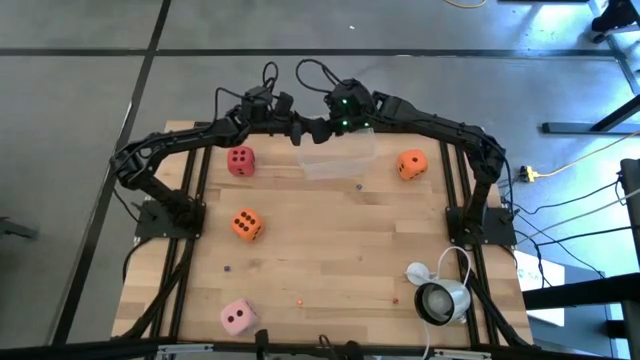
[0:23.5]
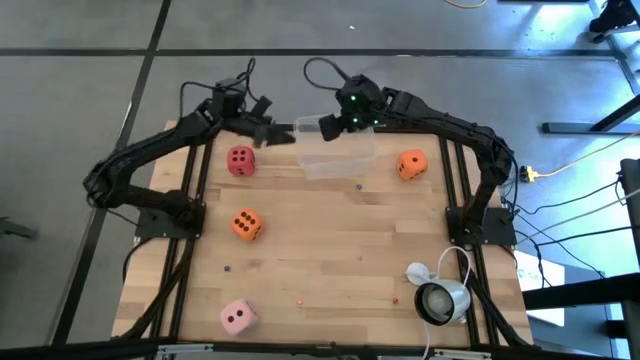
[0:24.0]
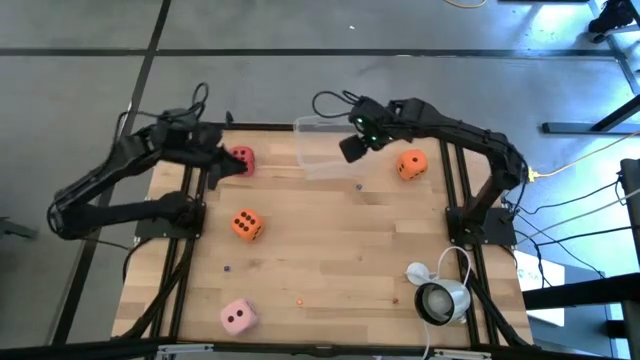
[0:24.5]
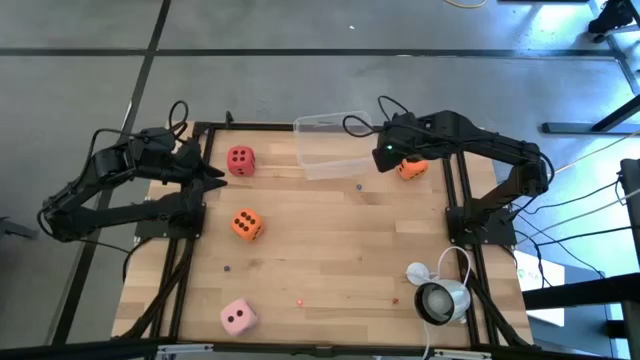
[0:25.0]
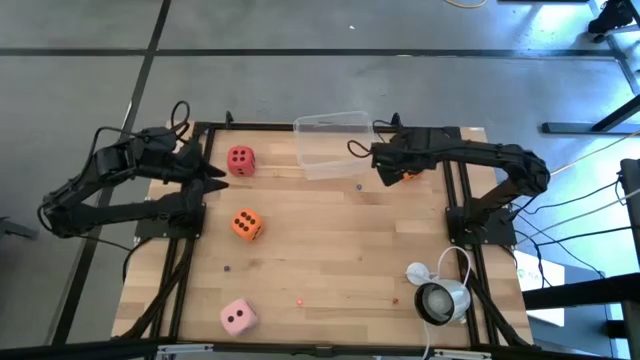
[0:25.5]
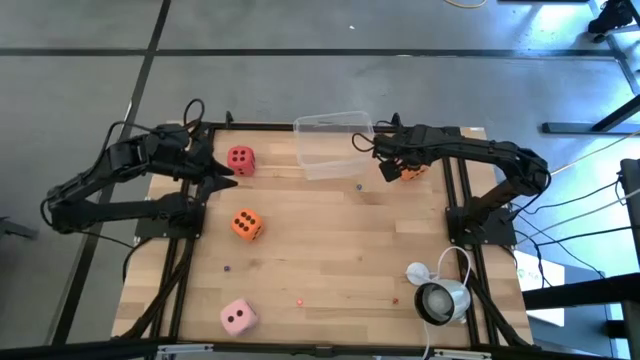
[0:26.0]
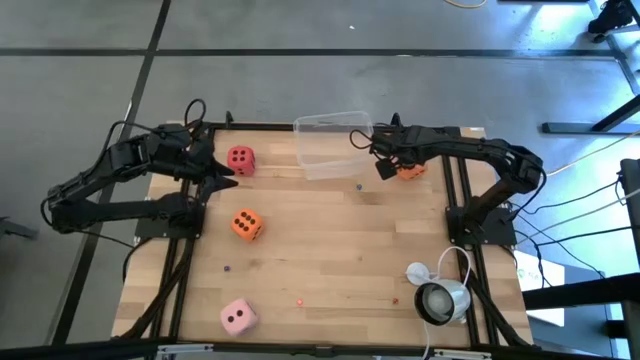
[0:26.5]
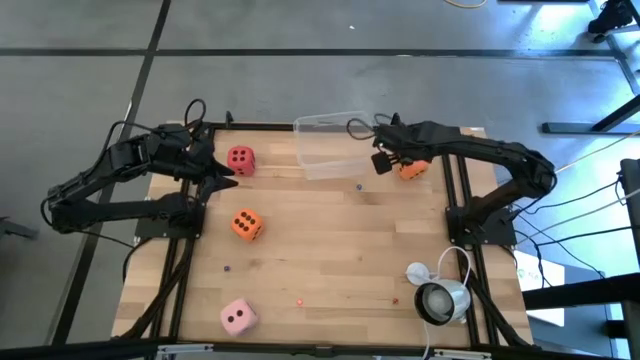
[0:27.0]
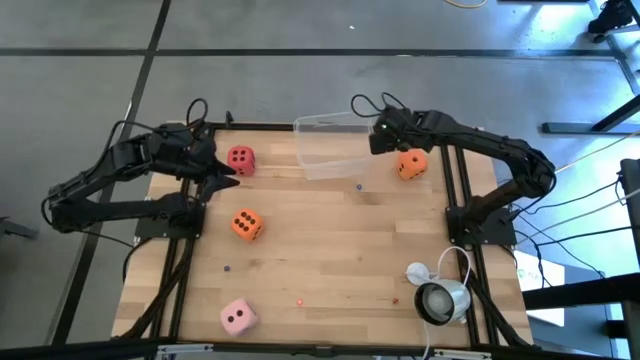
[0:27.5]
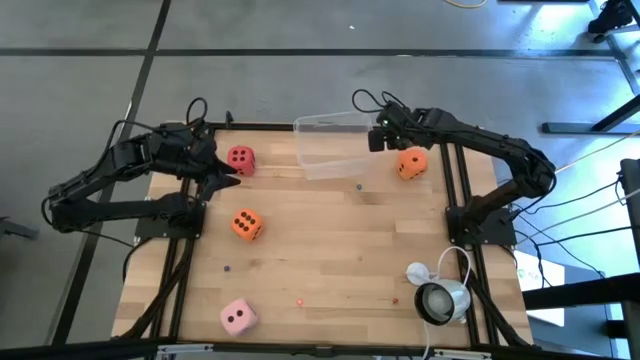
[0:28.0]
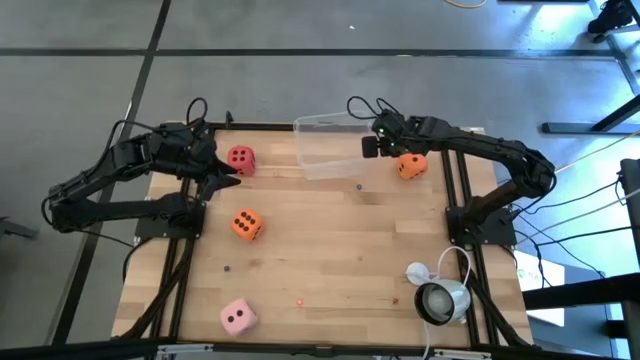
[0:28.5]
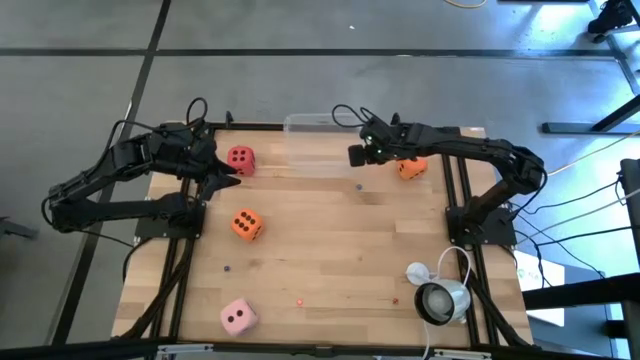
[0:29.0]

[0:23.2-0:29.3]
Task: Pick & Place Dice
Adjust the transparent bin

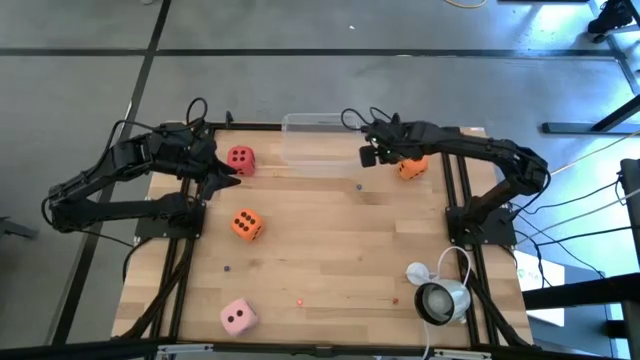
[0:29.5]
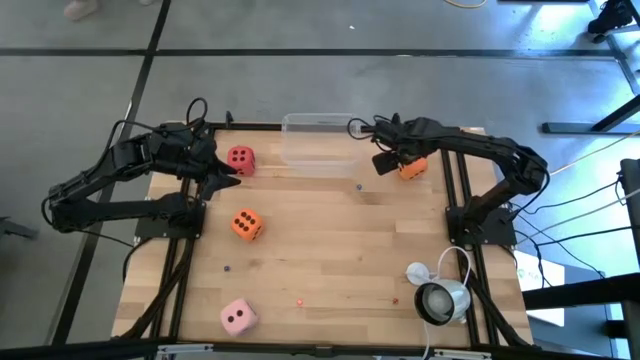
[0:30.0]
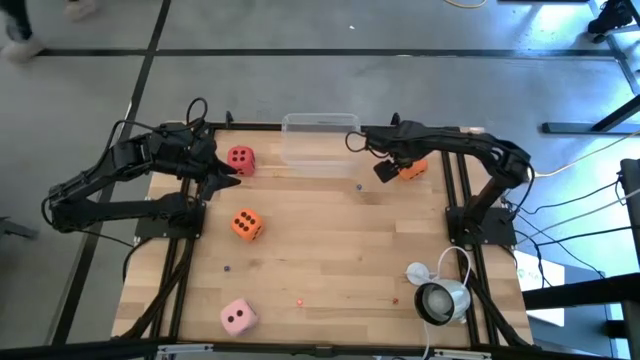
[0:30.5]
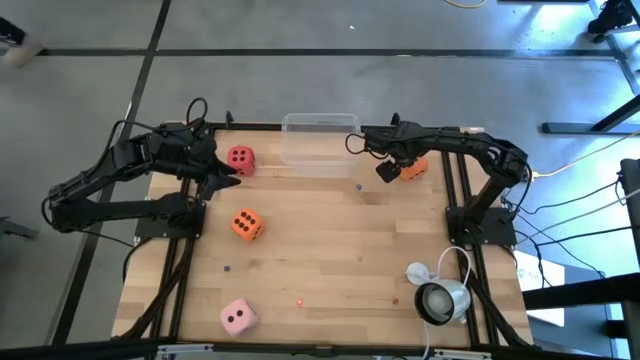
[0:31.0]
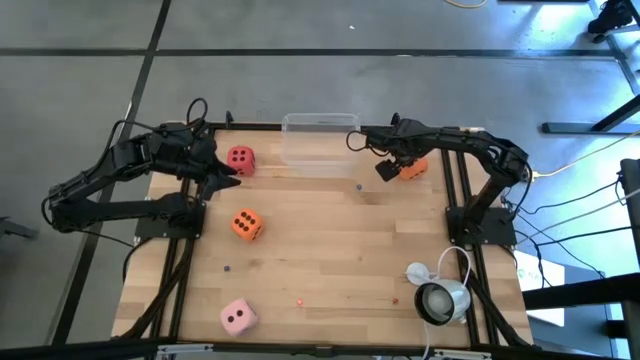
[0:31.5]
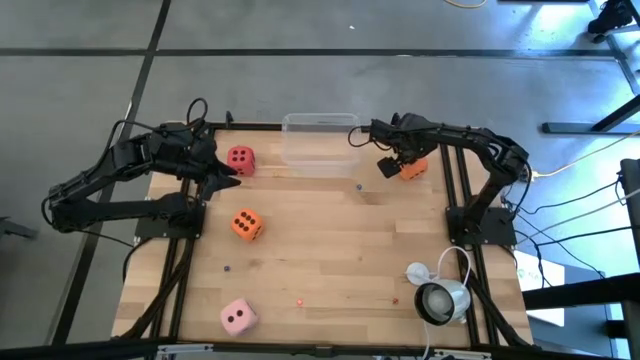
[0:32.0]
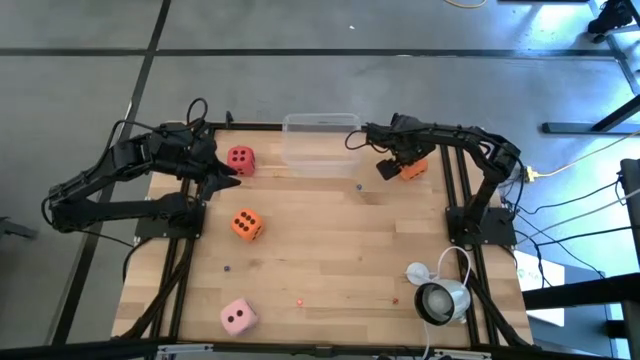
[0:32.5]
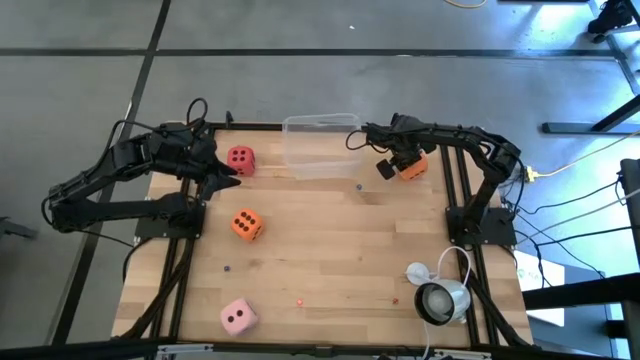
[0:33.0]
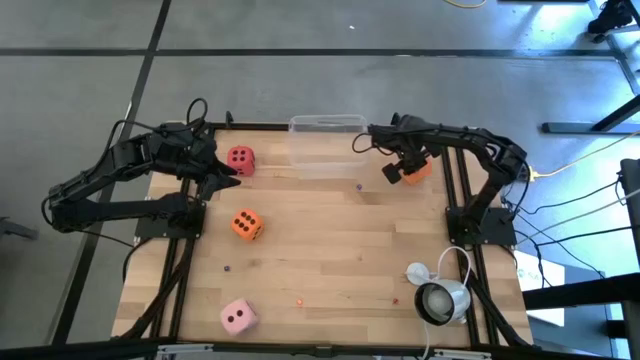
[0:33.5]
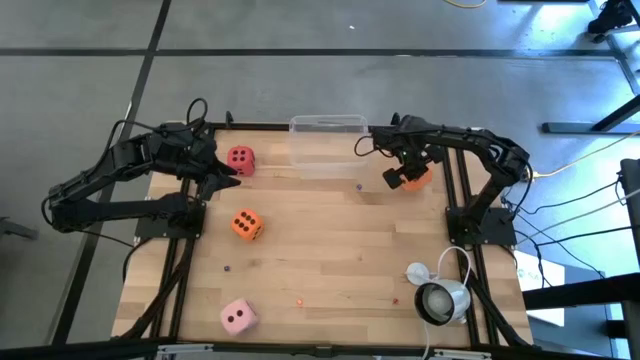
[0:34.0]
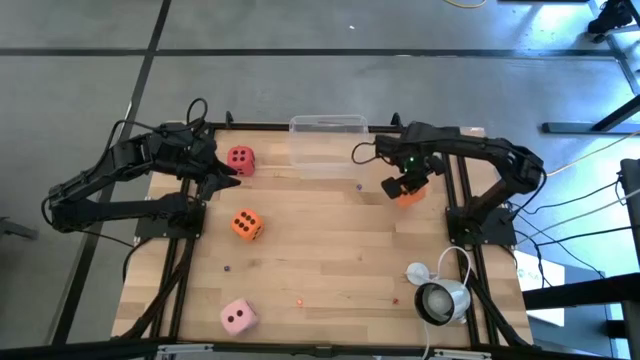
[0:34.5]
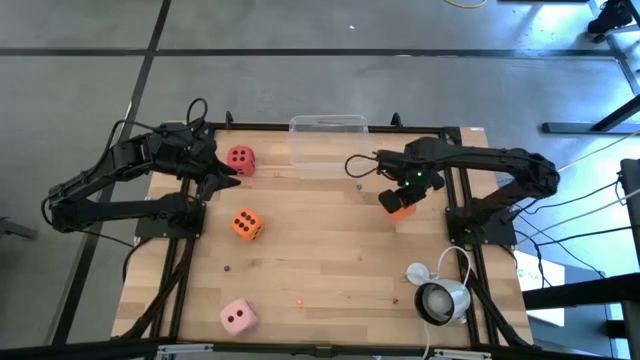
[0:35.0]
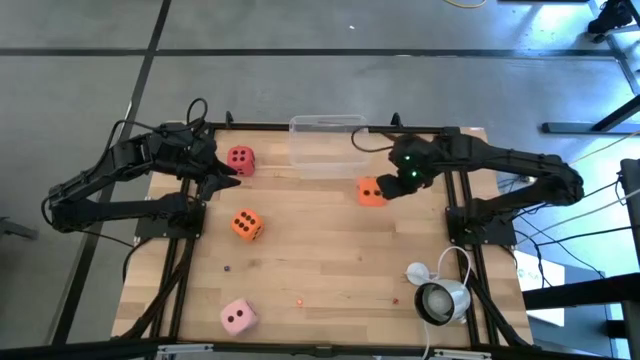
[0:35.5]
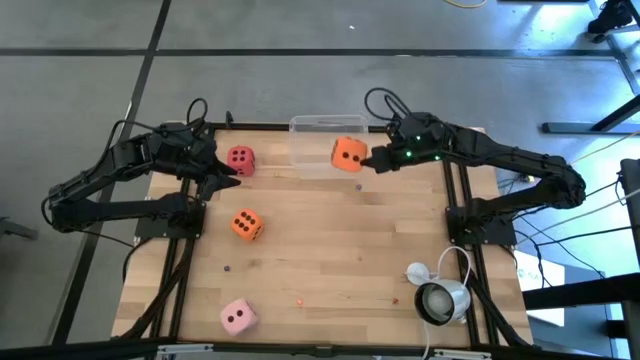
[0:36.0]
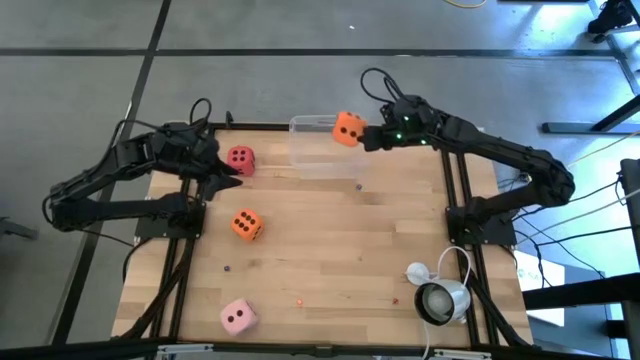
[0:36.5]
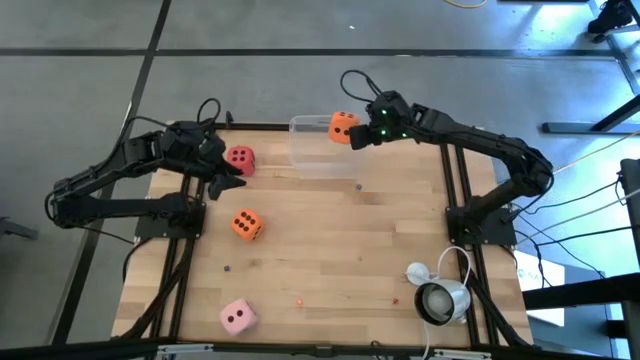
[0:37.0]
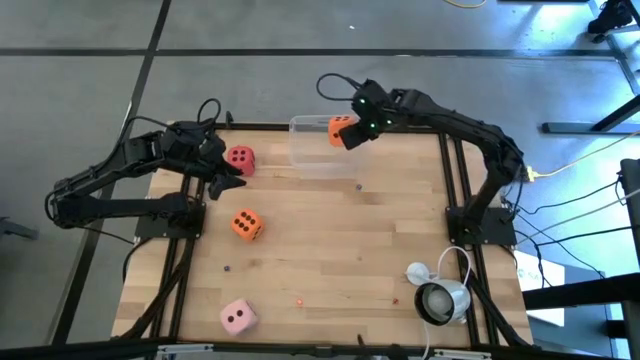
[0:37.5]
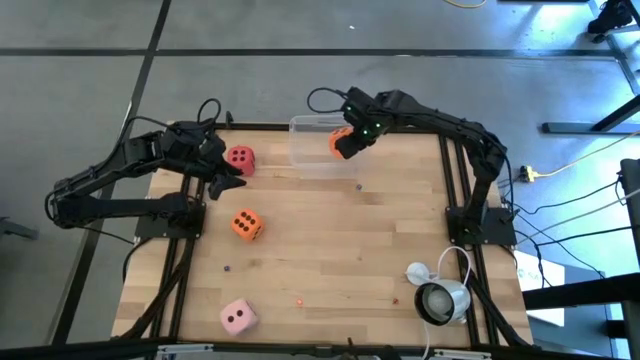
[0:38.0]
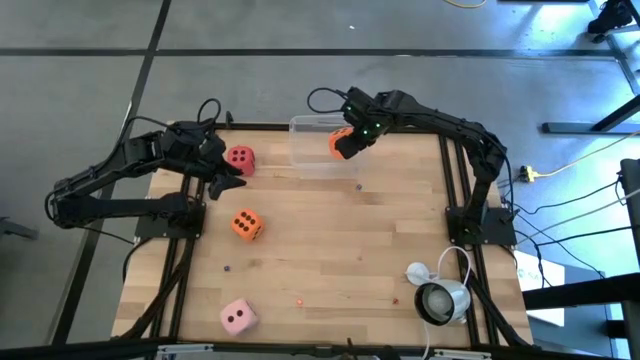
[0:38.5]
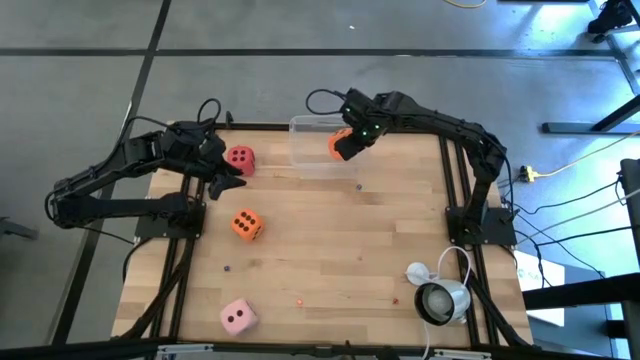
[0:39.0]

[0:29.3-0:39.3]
Put the large orange dice into the transparent bin
